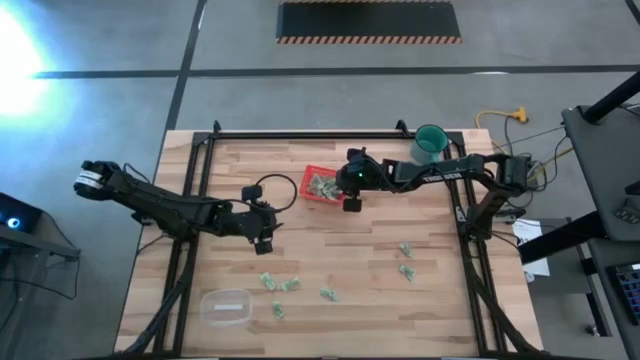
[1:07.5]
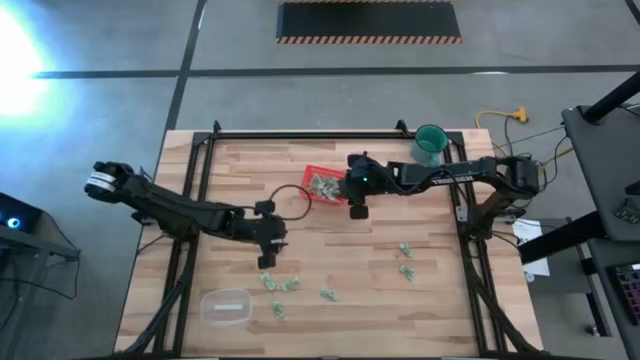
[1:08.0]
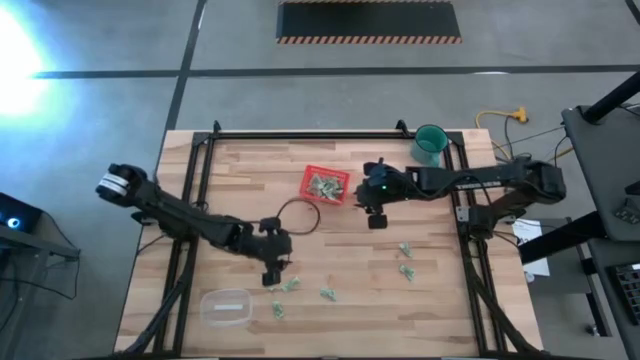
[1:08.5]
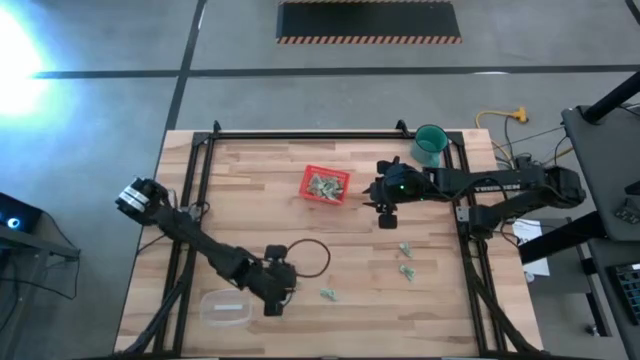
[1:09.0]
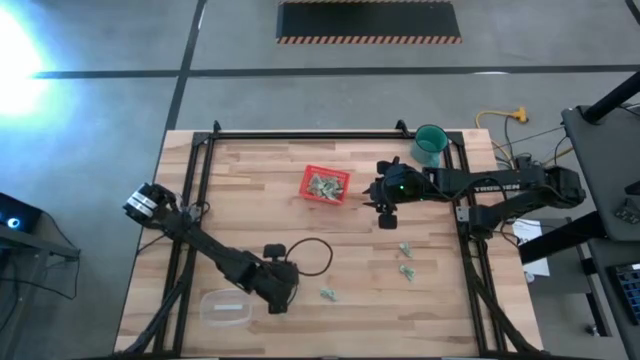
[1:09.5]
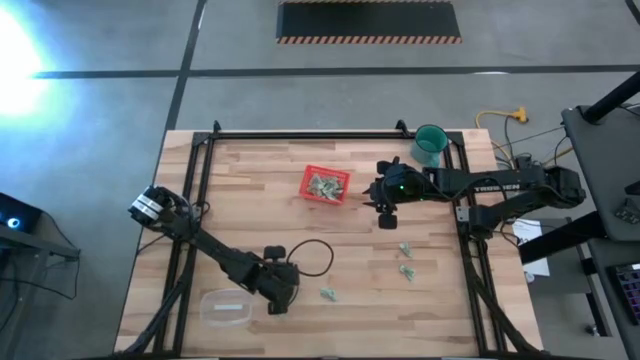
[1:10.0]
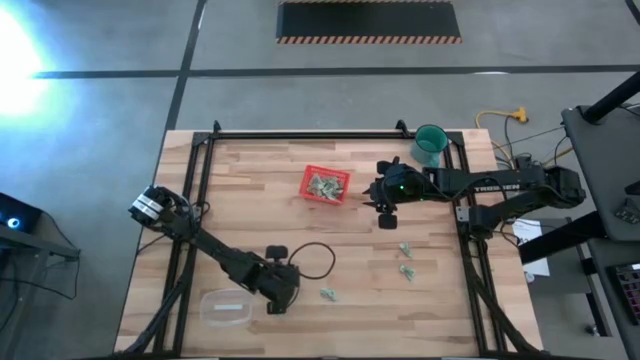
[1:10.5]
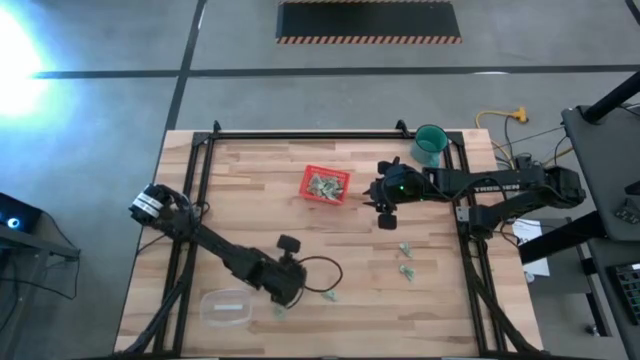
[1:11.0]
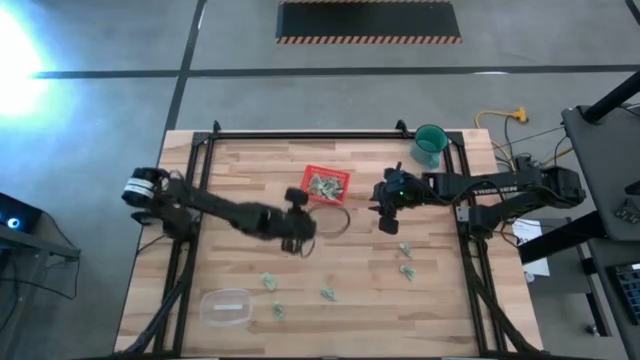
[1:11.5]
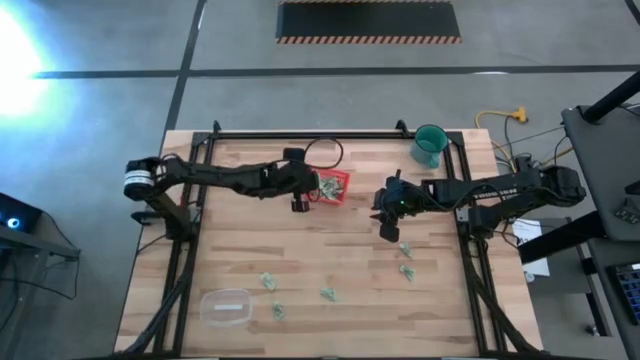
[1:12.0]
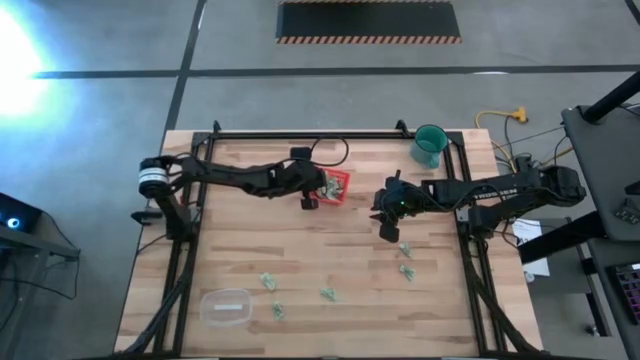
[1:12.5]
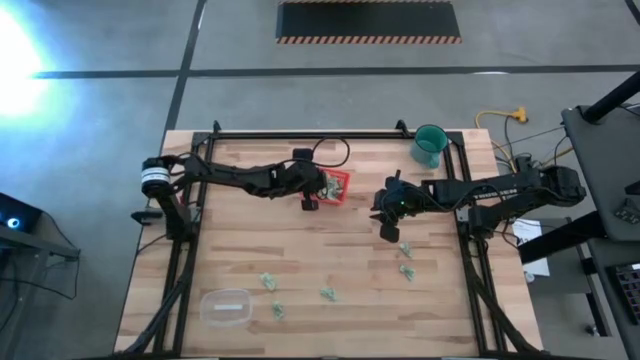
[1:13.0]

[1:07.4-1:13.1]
Task: Pick and place items into bin
Put the stevia packet into the orange bin

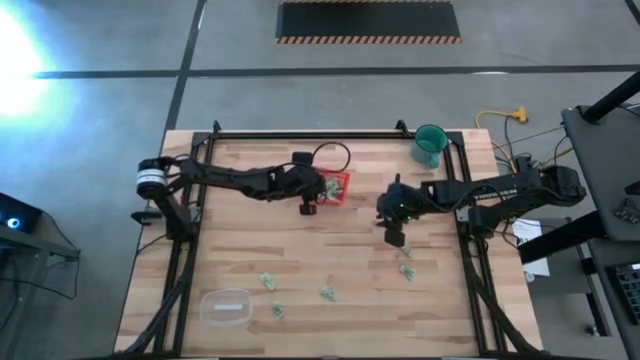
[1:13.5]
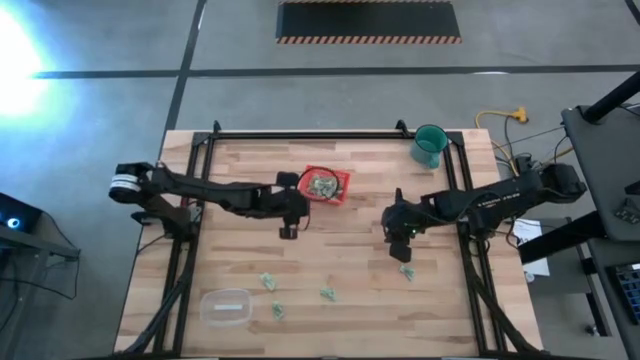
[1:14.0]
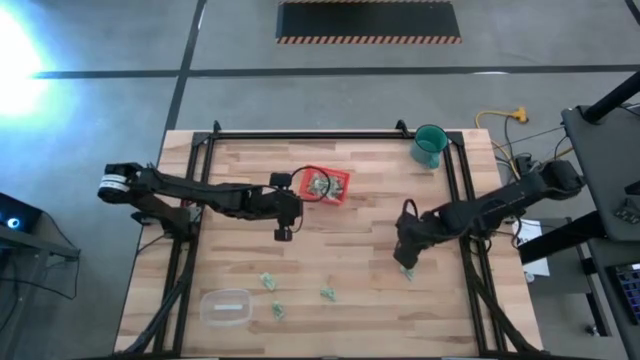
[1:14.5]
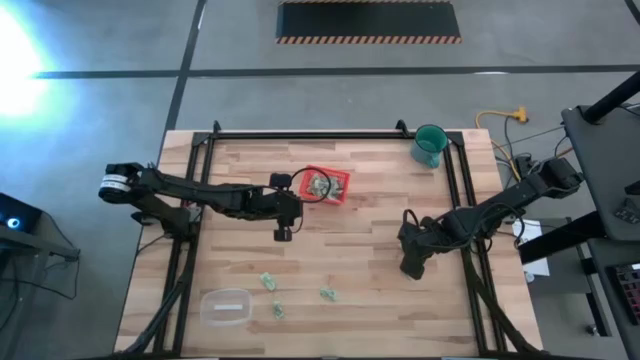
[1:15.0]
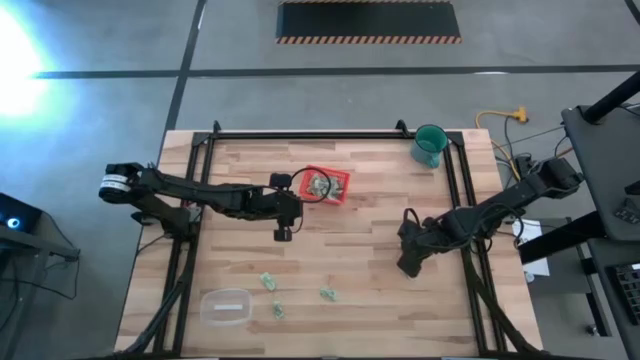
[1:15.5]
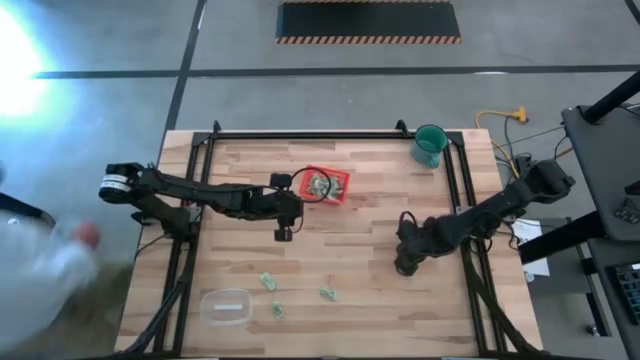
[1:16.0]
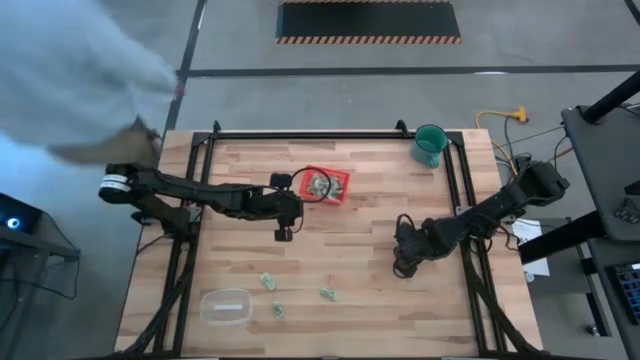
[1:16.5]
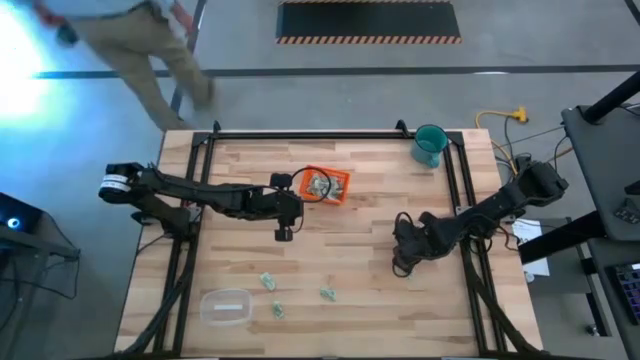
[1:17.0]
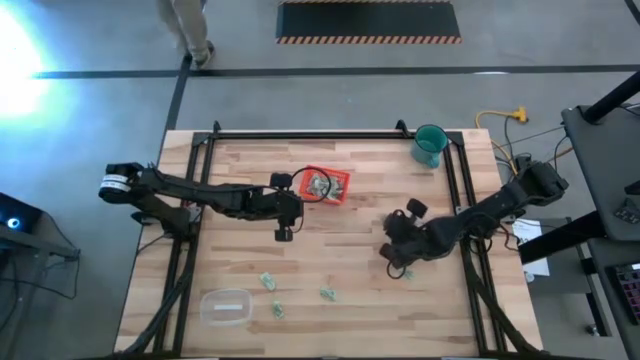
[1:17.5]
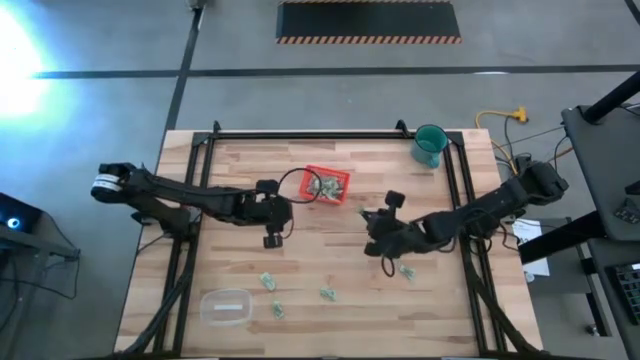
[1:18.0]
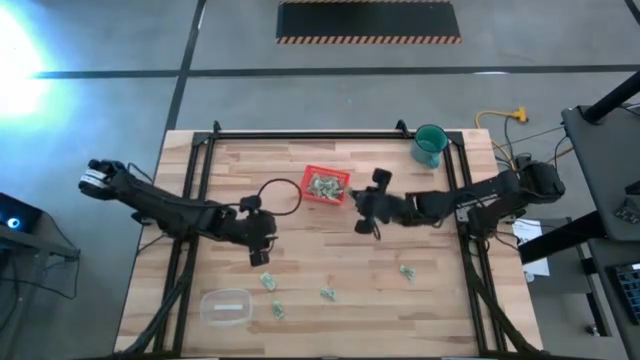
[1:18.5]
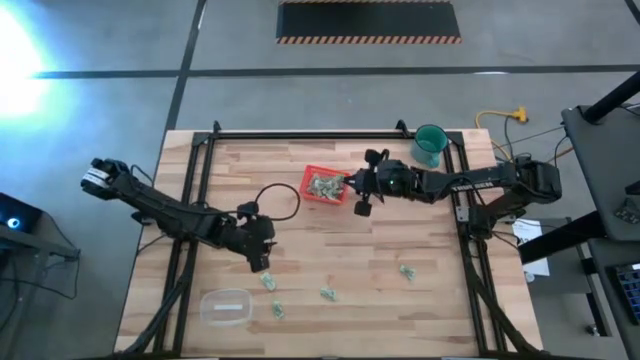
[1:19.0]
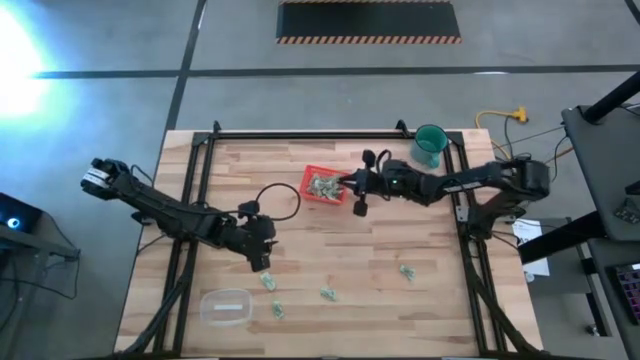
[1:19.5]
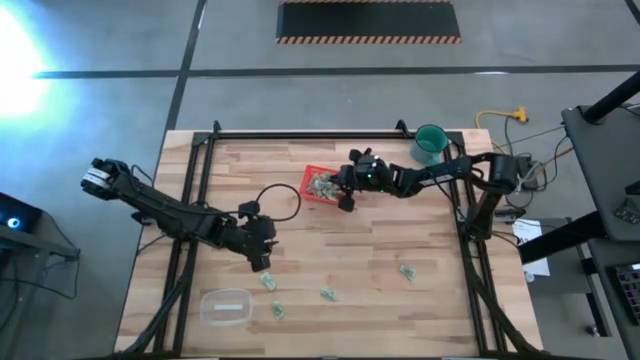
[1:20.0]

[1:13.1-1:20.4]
Put the stevia packet into the orange bin

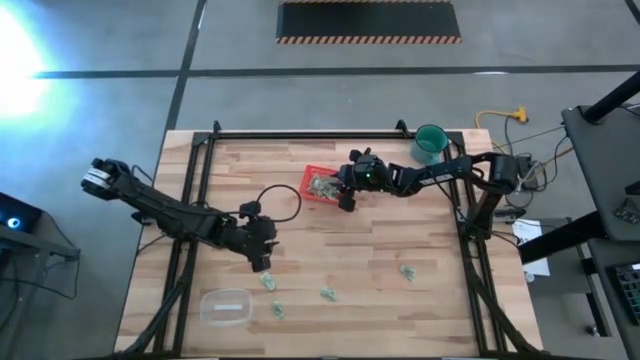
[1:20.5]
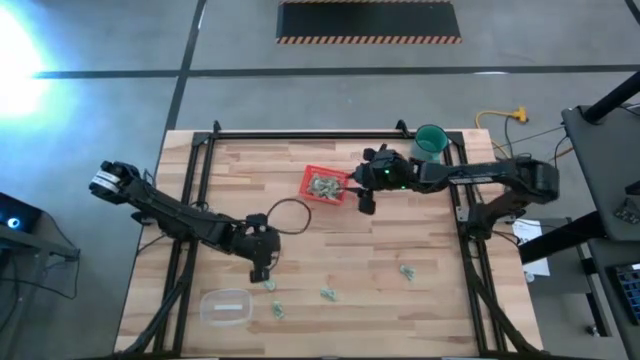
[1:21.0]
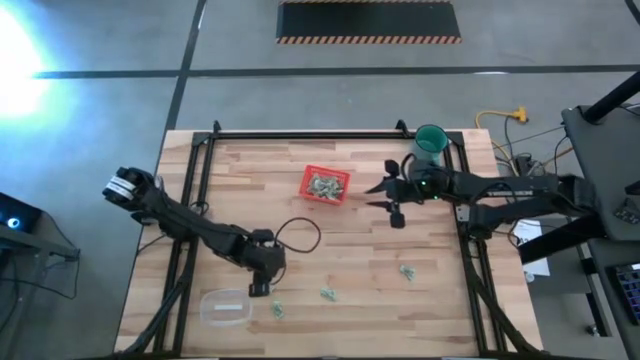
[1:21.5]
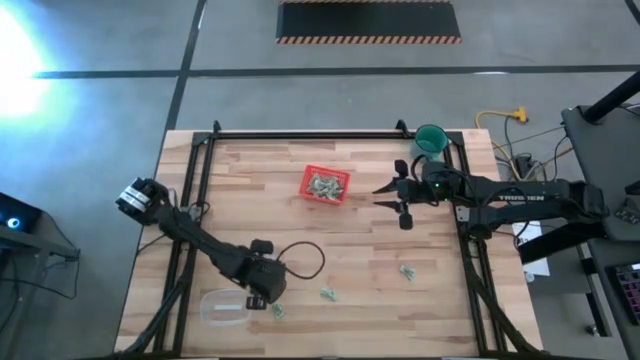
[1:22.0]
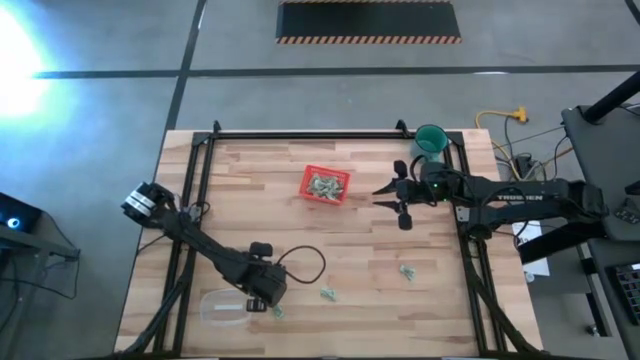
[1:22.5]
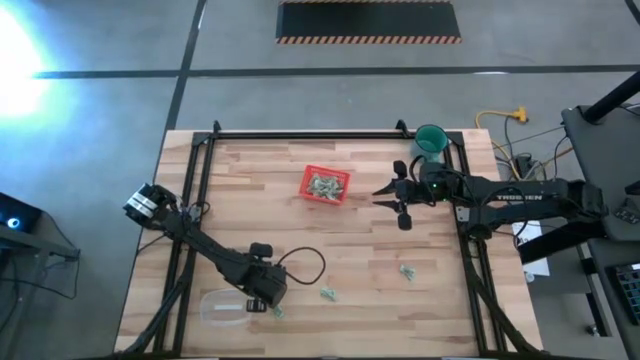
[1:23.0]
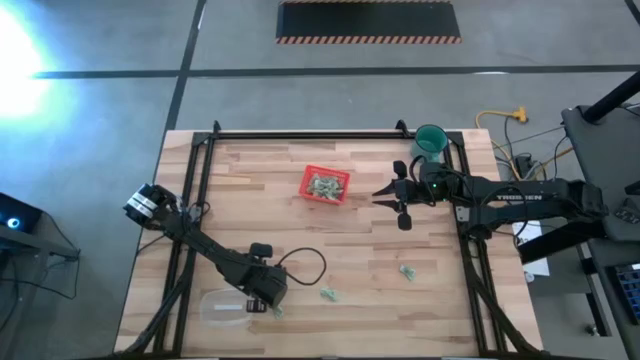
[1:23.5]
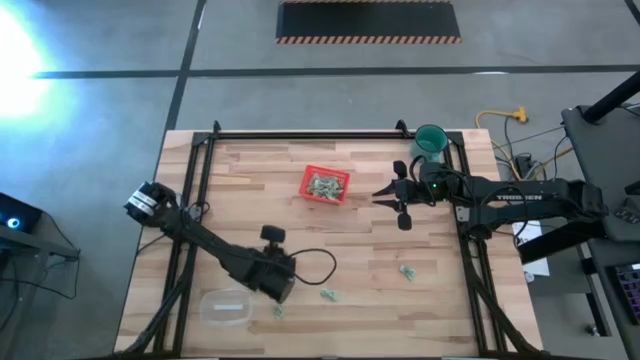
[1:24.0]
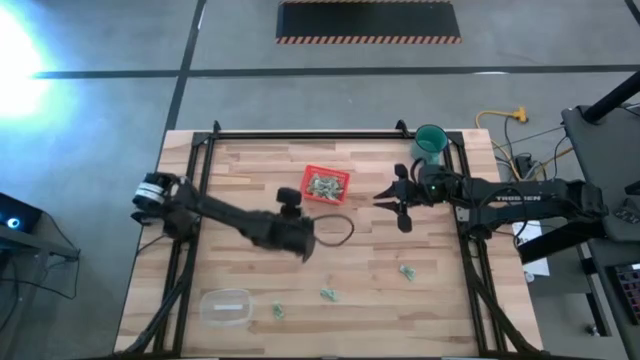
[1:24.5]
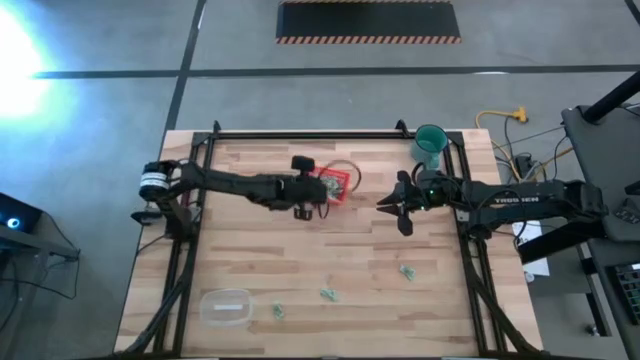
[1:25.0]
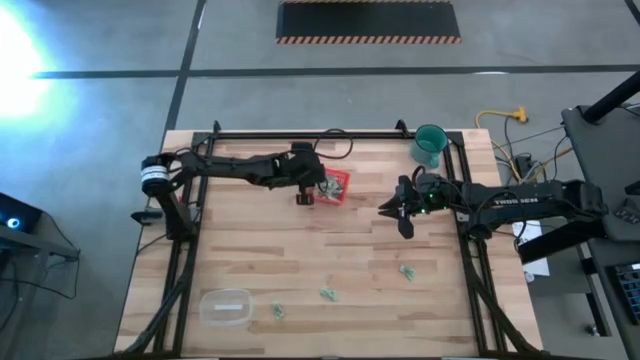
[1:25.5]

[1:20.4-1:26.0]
Put the stevia packet into the orange bin
